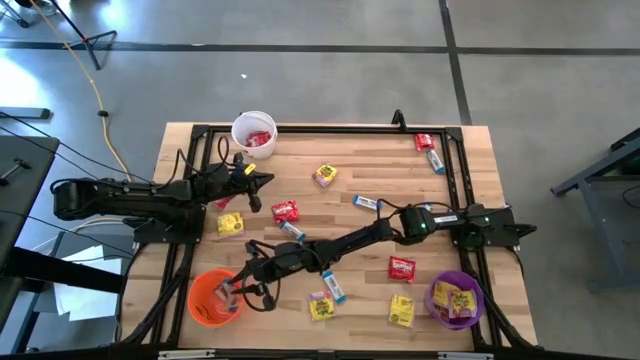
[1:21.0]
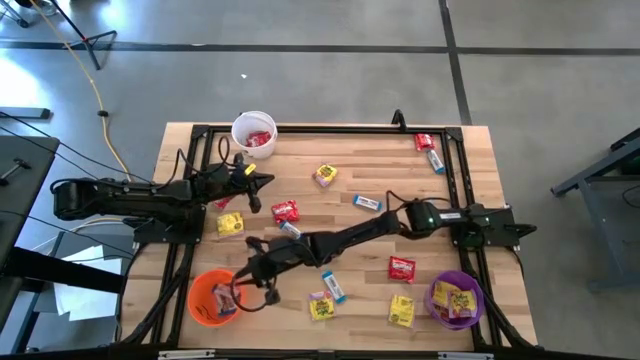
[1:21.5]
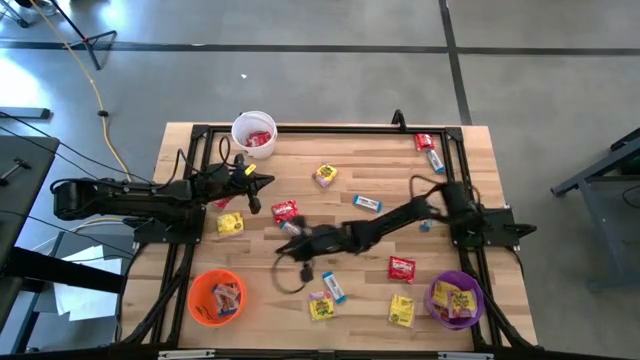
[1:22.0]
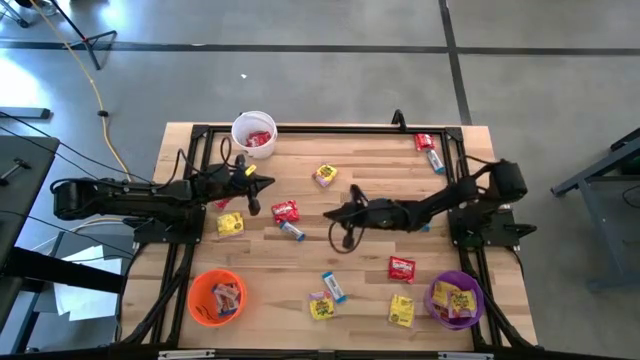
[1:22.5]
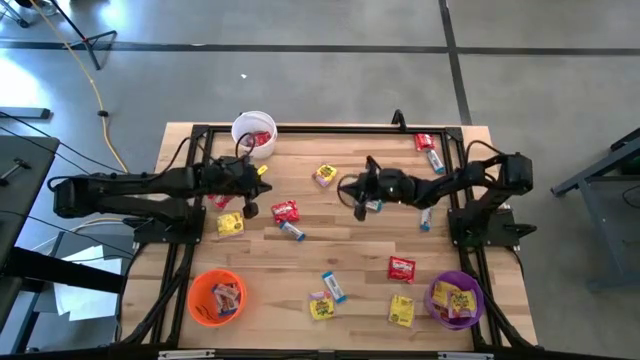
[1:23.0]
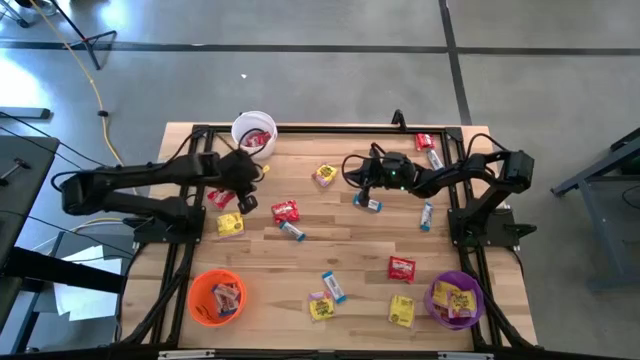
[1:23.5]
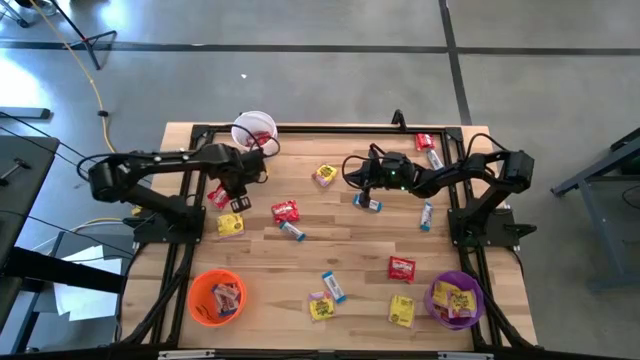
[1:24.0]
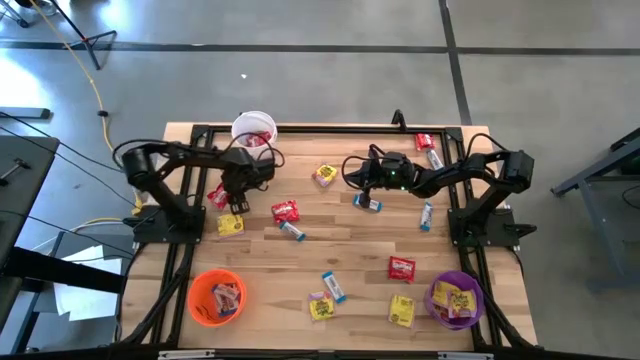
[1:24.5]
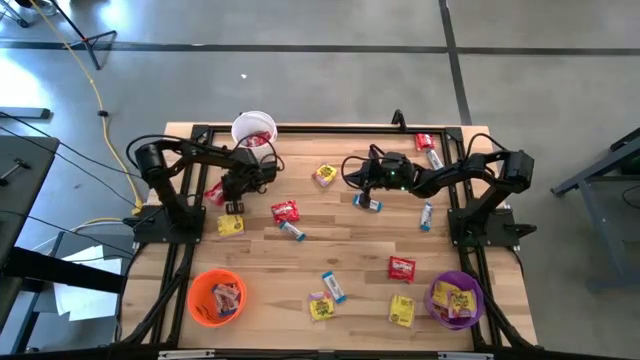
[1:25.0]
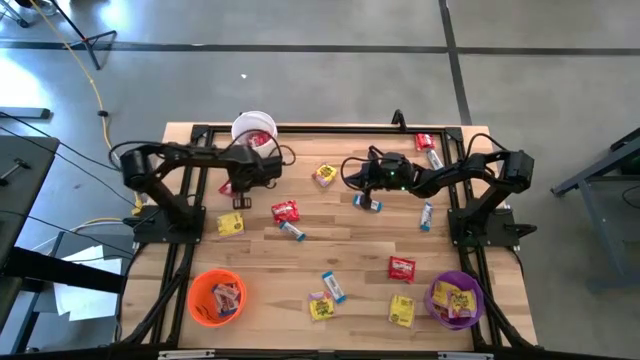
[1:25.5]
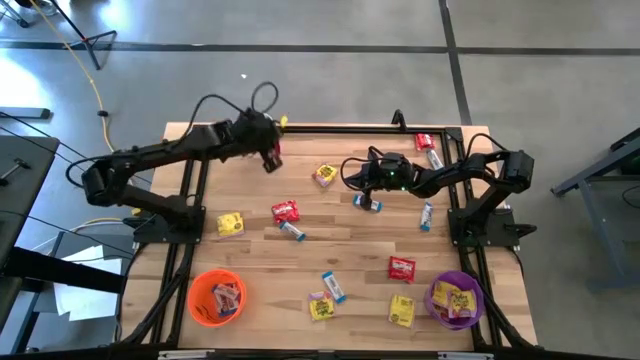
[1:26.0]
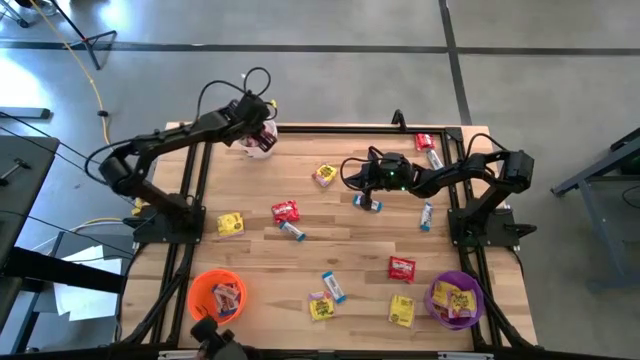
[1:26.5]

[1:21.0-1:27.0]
Task: Sort candy
Put the red candy into the white bucket

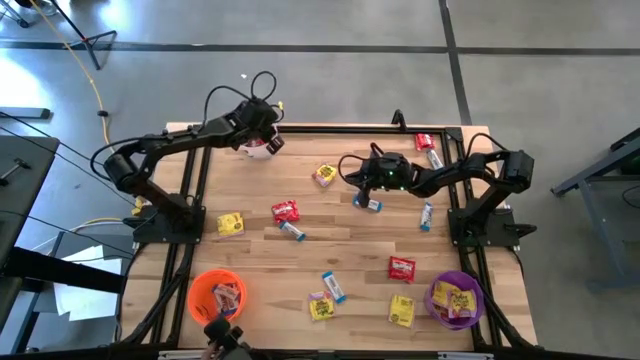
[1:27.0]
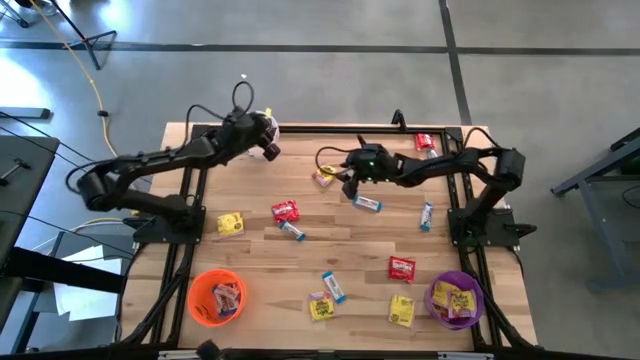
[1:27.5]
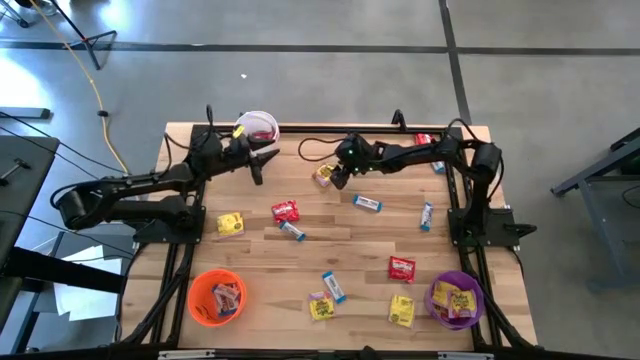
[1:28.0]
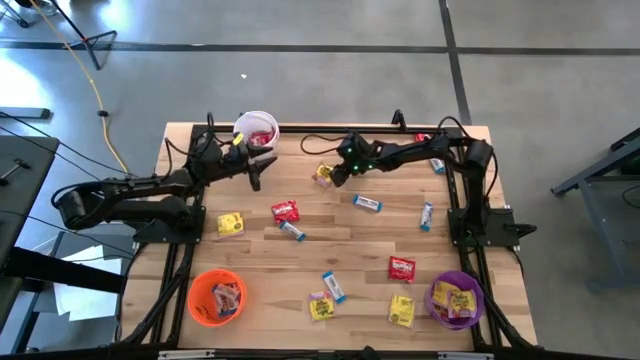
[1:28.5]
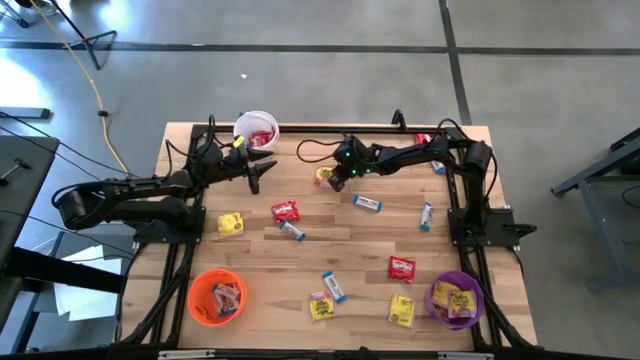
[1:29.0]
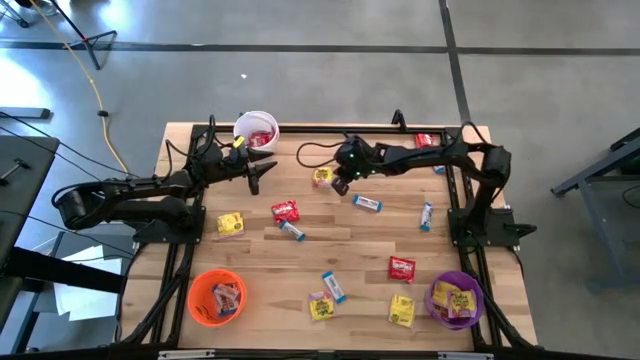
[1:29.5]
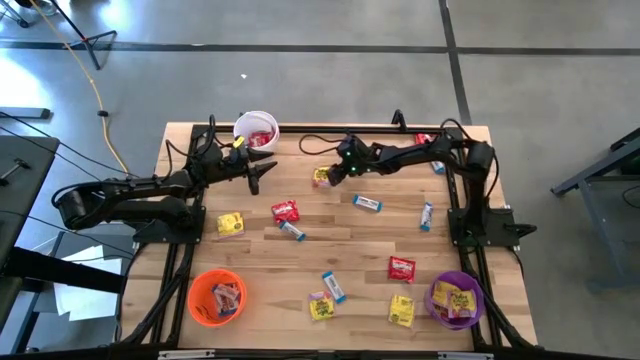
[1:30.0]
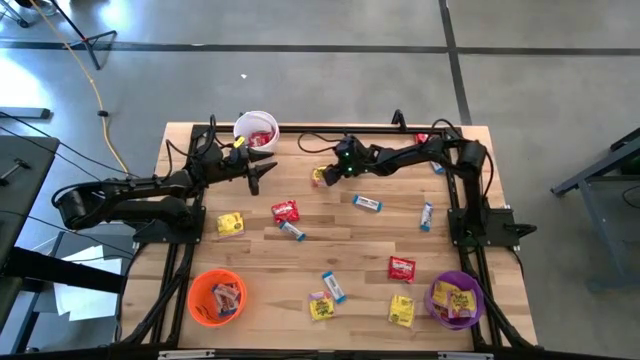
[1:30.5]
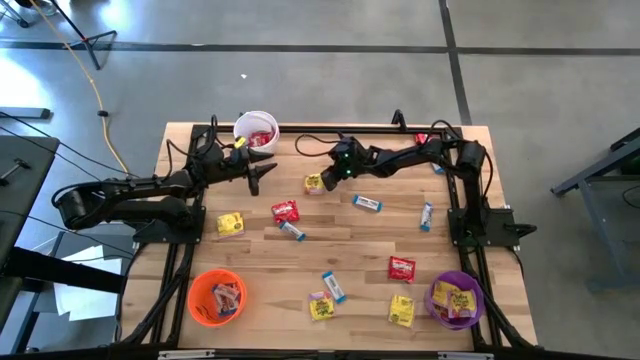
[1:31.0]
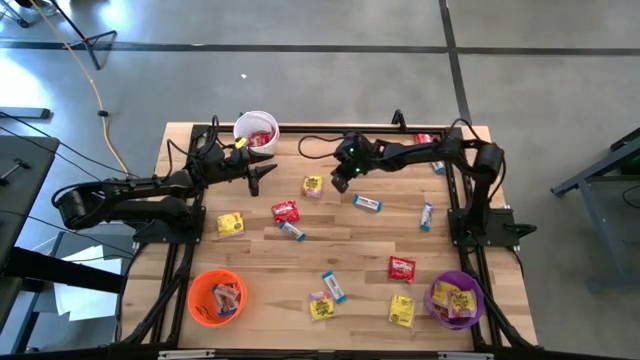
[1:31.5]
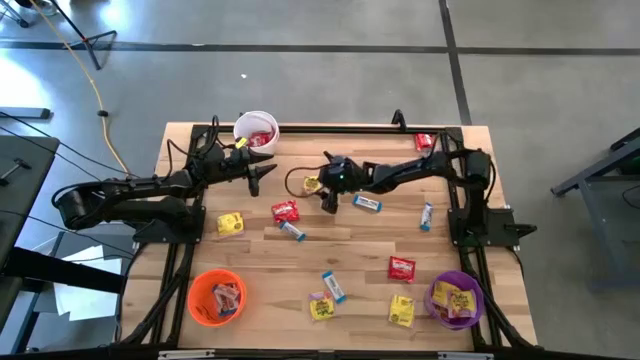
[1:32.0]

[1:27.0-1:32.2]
Put the yellow candy into the purple bucket

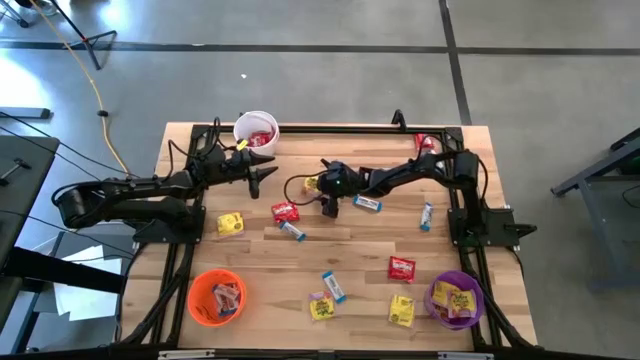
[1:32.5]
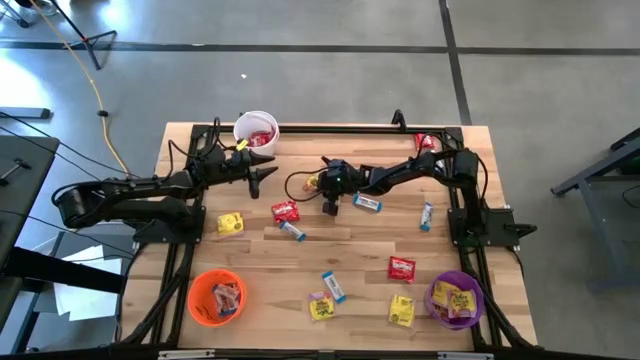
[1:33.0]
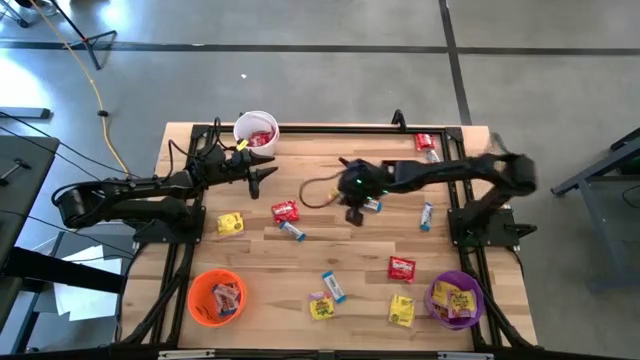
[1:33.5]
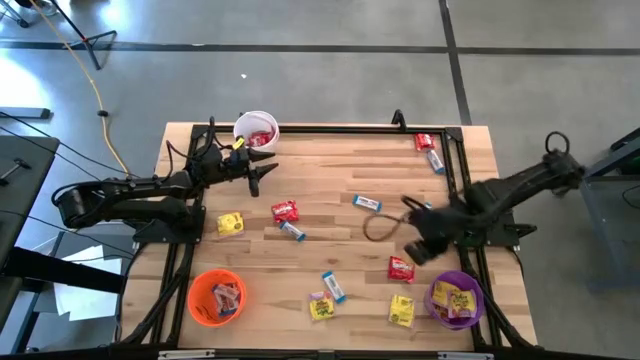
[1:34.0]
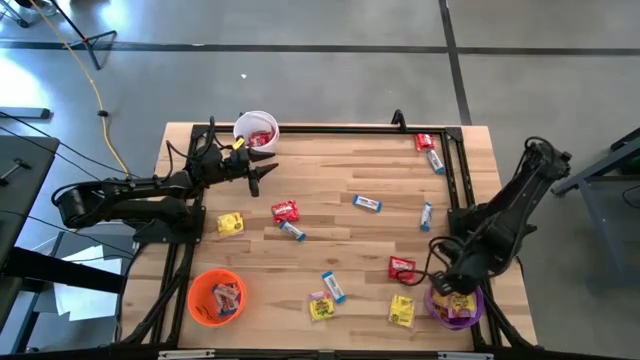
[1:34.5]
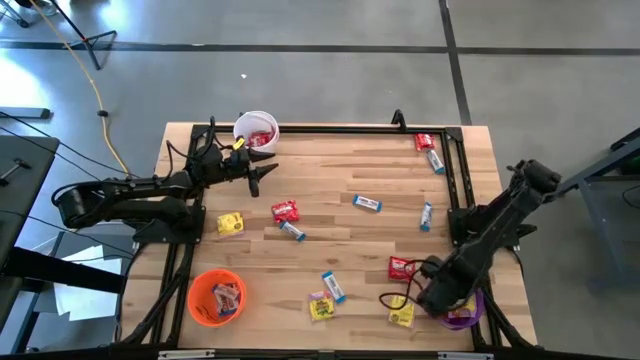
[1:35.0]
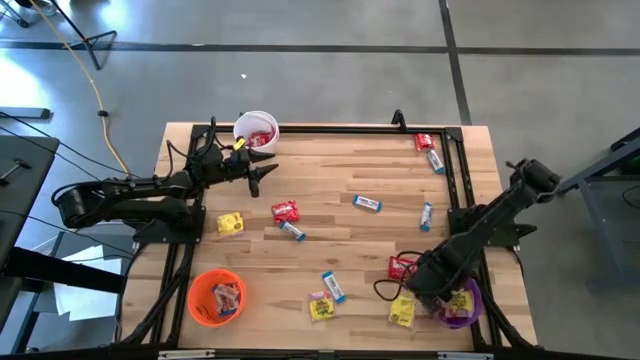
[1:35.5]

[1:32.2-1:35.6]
Put the yellow candy into the purple bucket

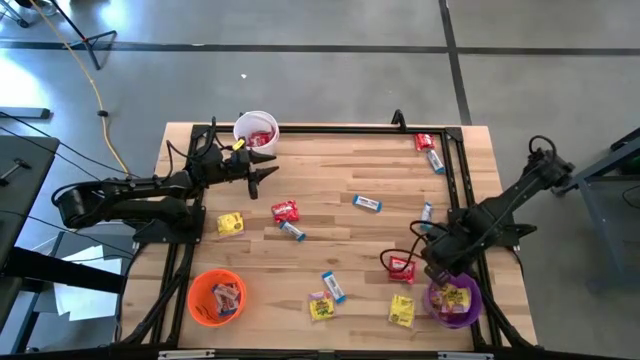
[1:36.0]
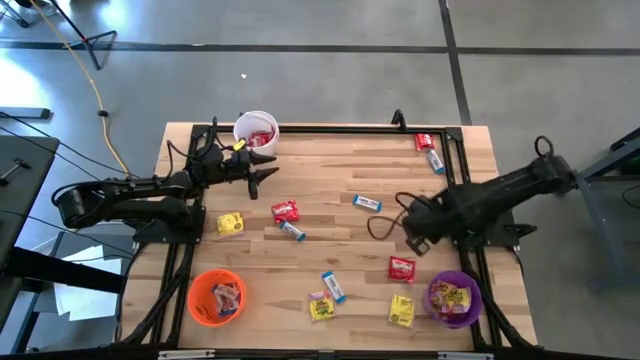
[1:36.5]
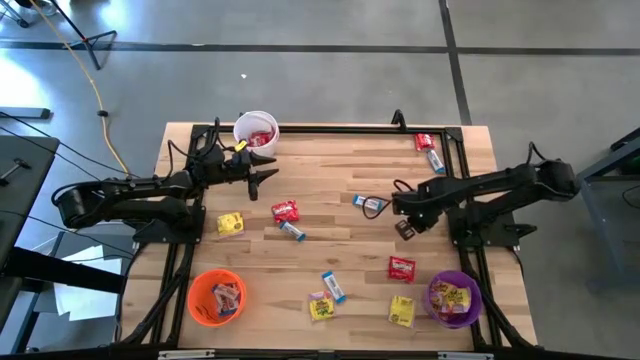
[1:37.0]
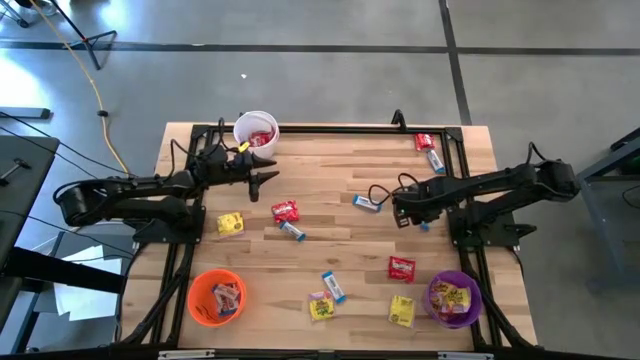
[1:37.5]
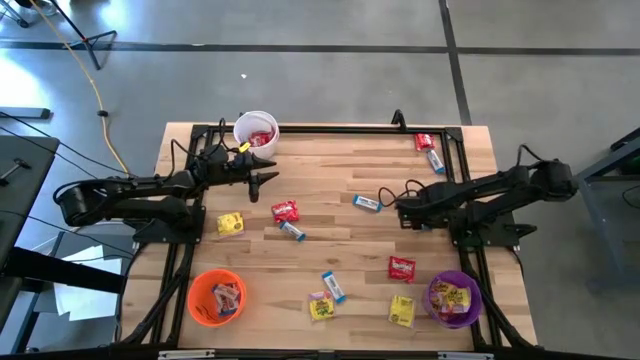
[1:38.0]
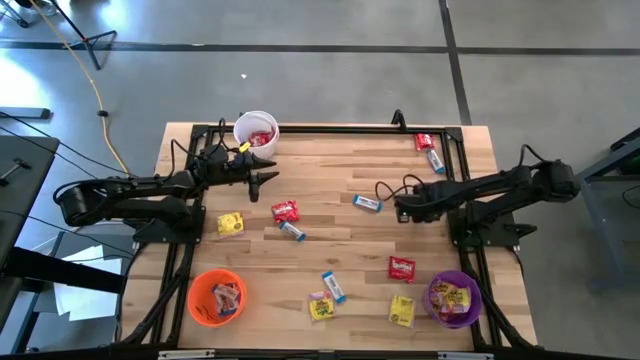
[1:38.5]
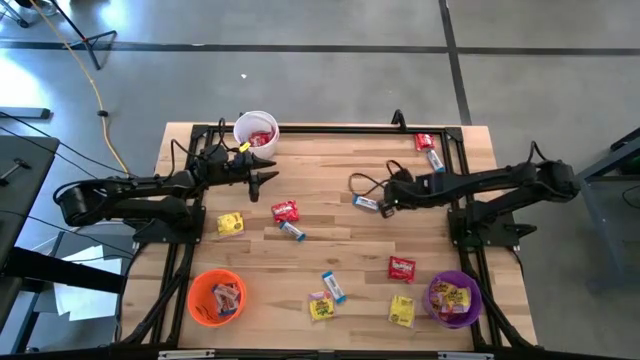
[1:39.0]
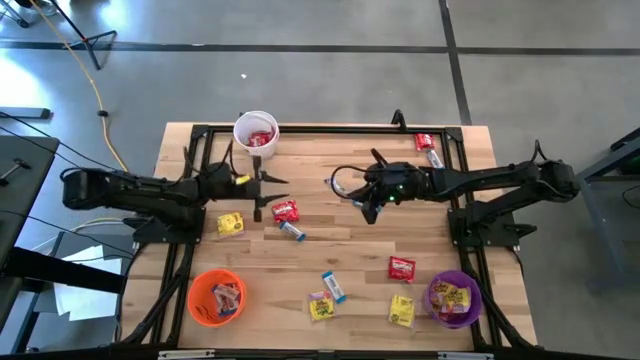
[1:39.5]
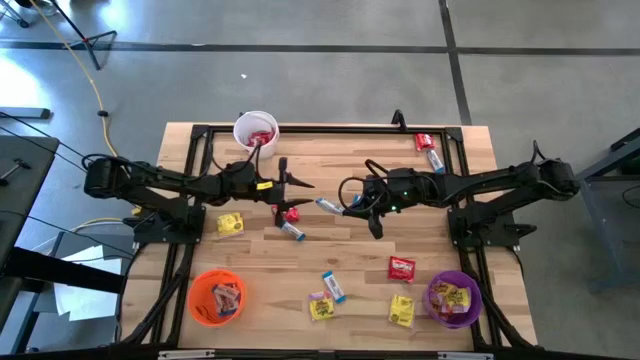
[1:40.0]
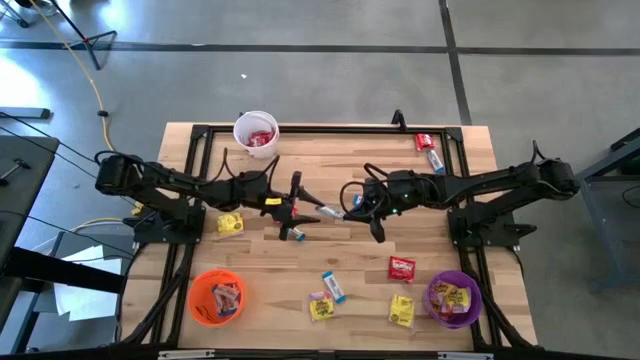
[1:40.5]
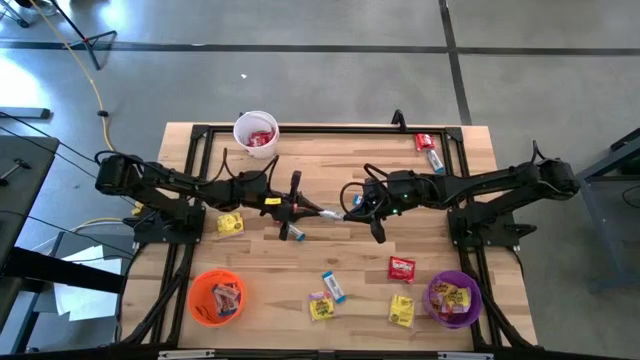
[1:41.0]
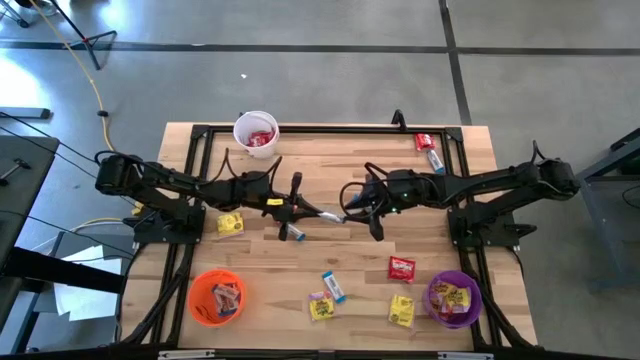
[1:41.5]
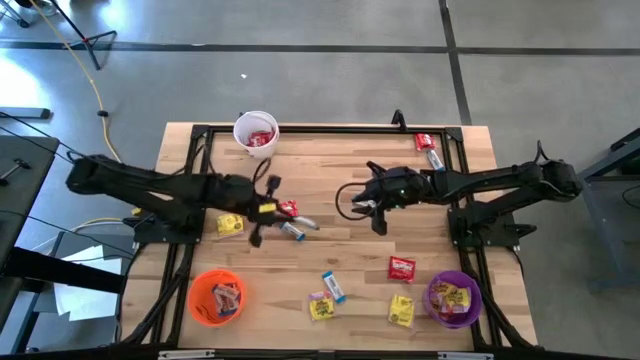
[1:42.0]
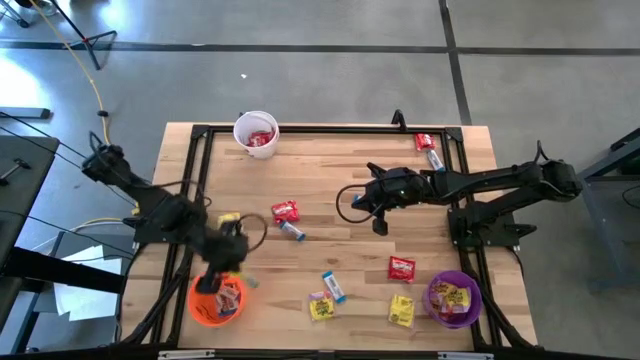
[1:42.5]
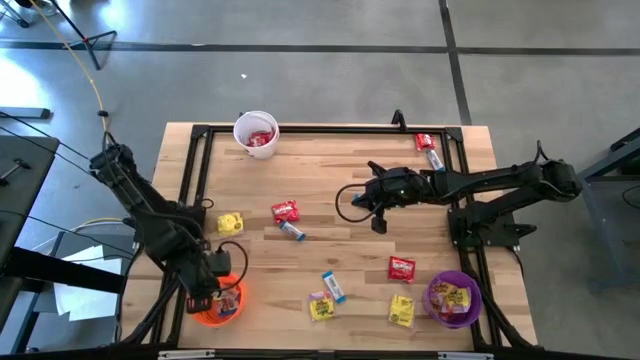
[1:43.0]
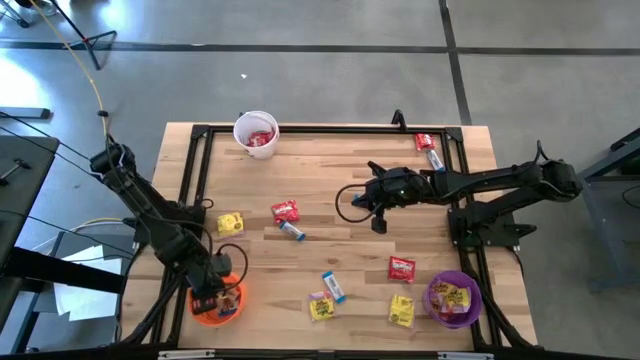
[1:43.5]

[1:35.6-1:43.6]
Put the white candy into the orange bucket
